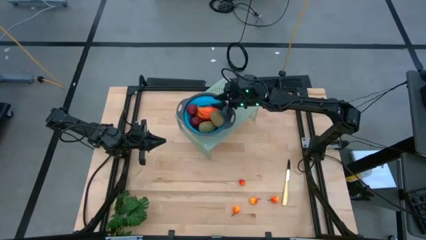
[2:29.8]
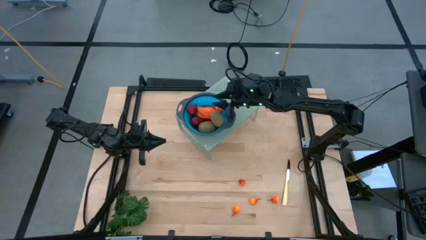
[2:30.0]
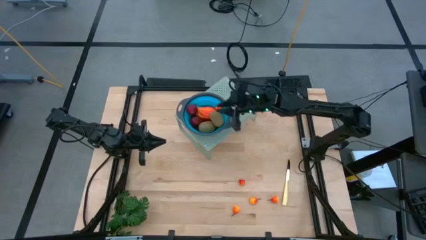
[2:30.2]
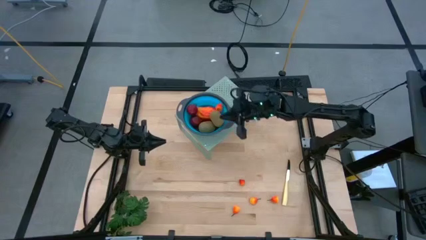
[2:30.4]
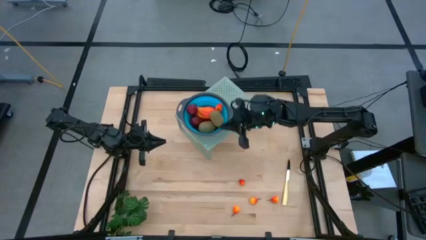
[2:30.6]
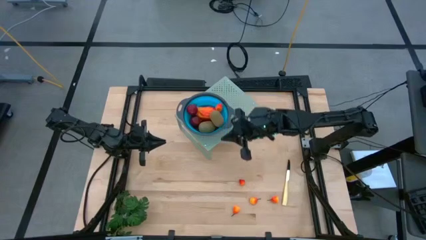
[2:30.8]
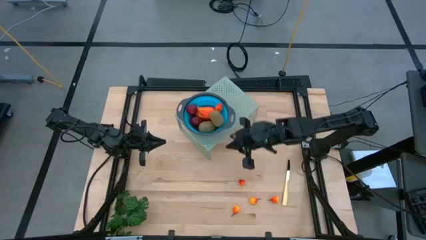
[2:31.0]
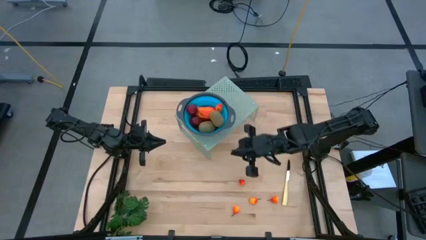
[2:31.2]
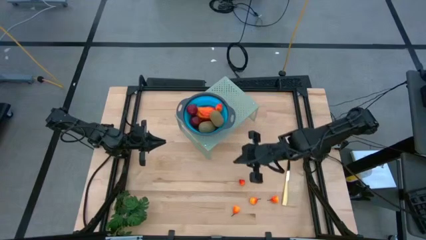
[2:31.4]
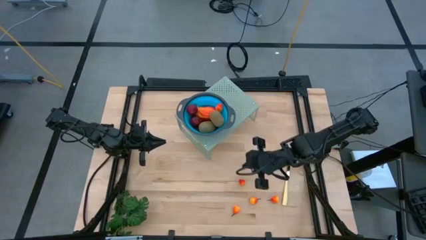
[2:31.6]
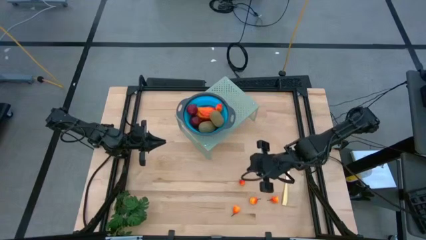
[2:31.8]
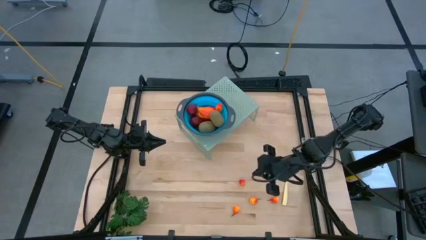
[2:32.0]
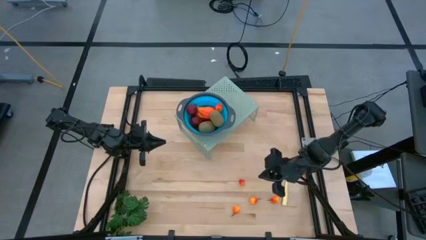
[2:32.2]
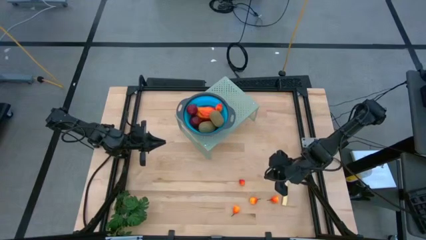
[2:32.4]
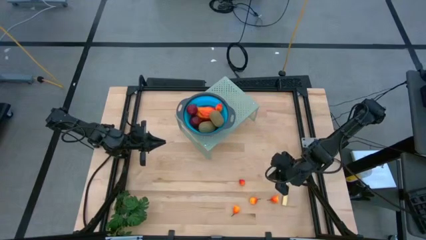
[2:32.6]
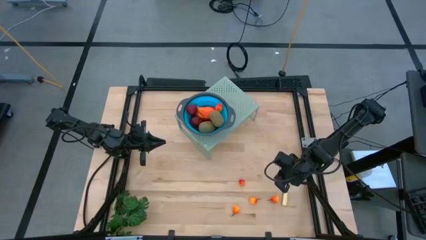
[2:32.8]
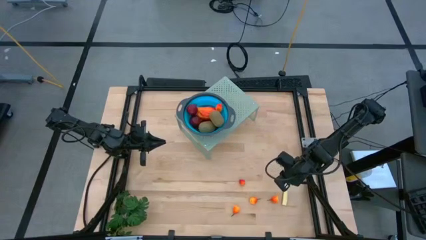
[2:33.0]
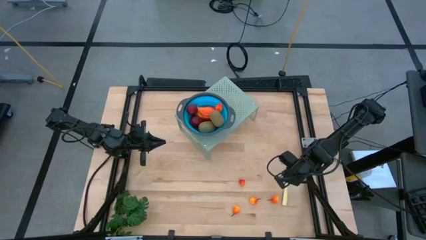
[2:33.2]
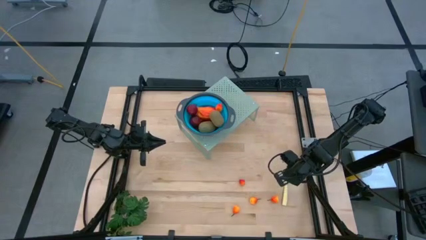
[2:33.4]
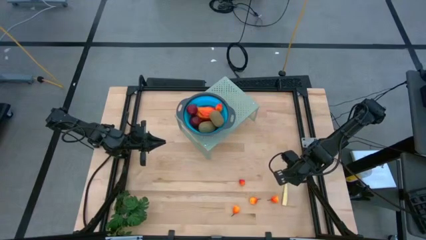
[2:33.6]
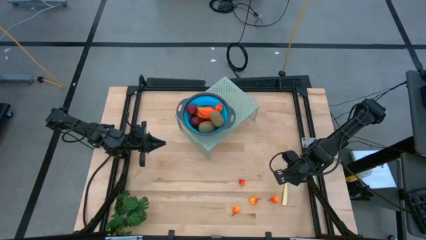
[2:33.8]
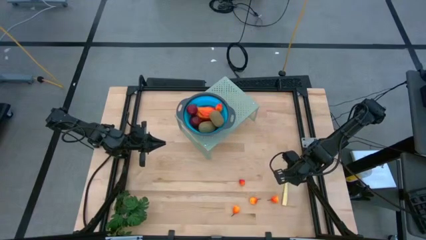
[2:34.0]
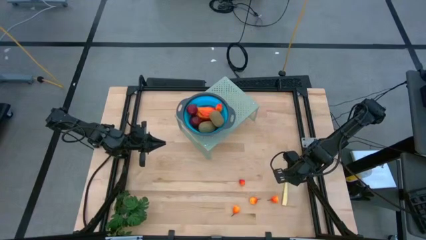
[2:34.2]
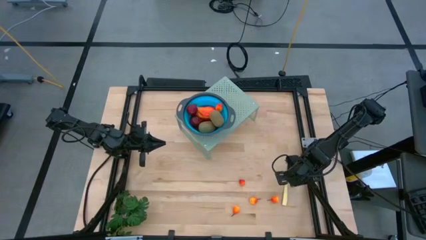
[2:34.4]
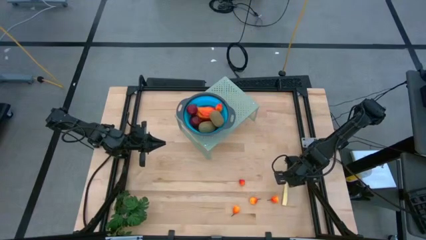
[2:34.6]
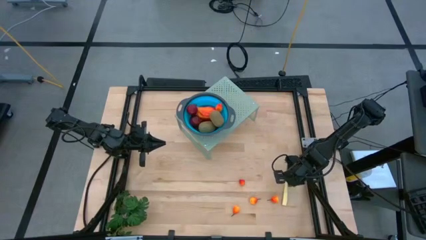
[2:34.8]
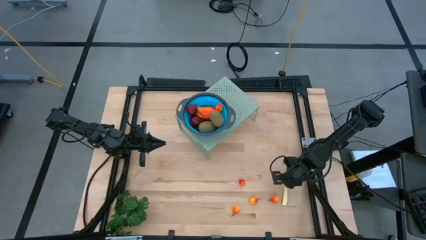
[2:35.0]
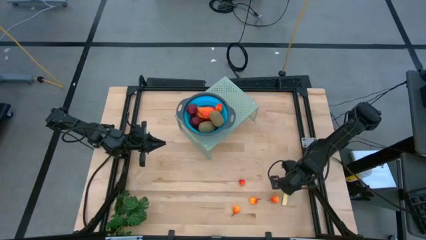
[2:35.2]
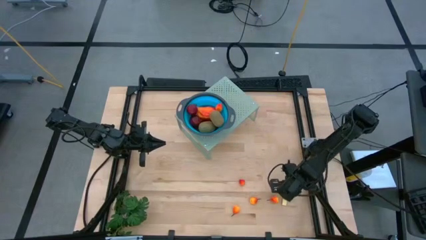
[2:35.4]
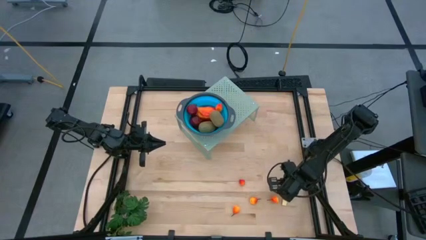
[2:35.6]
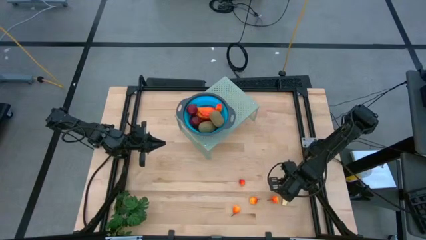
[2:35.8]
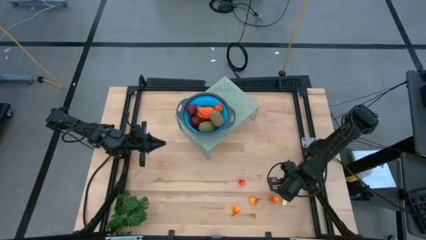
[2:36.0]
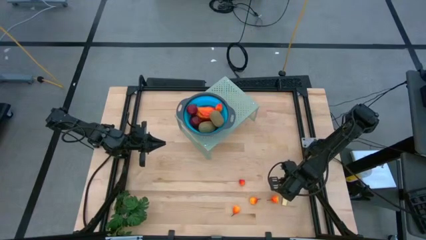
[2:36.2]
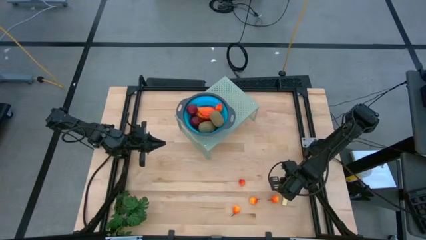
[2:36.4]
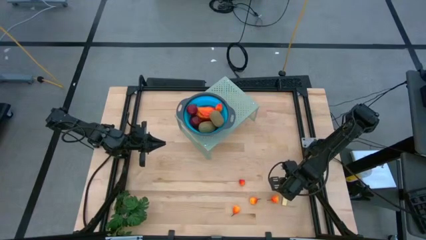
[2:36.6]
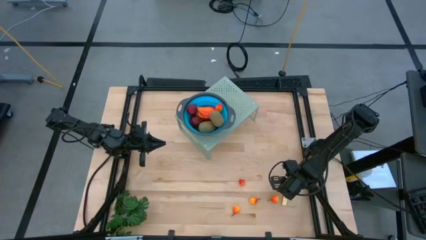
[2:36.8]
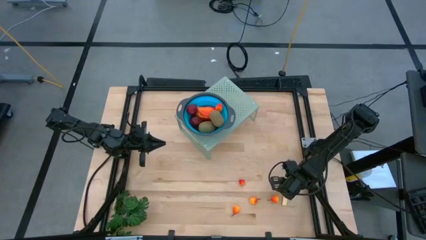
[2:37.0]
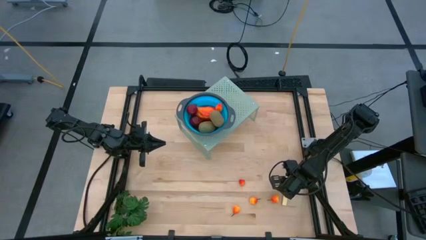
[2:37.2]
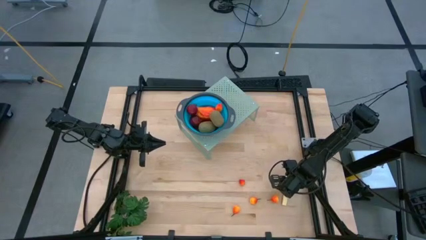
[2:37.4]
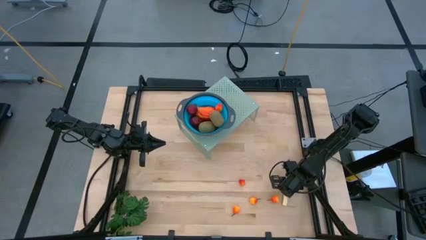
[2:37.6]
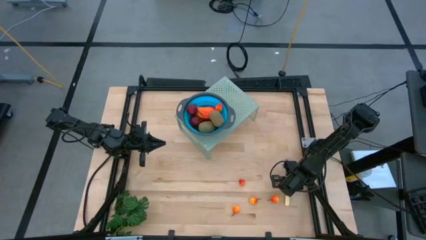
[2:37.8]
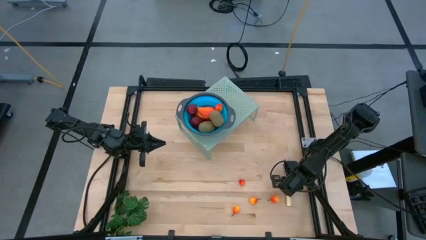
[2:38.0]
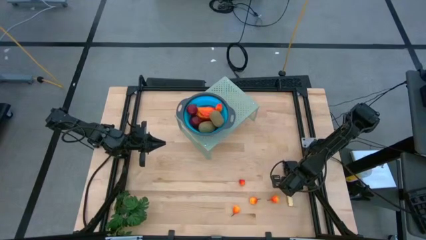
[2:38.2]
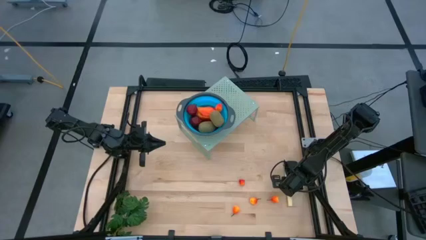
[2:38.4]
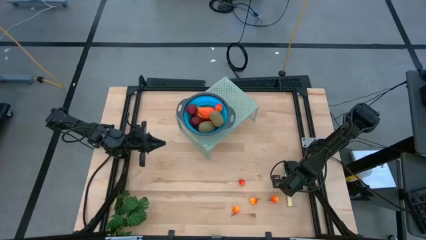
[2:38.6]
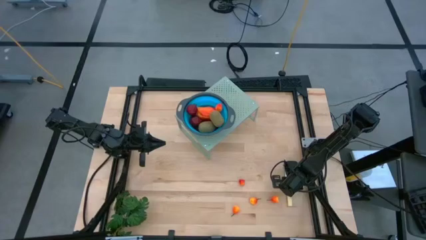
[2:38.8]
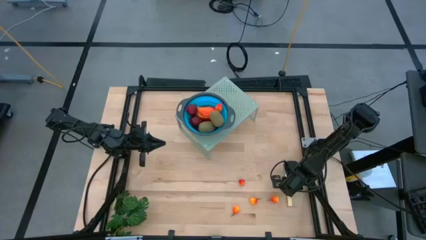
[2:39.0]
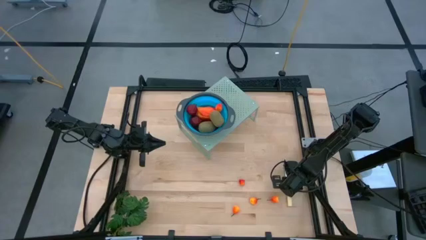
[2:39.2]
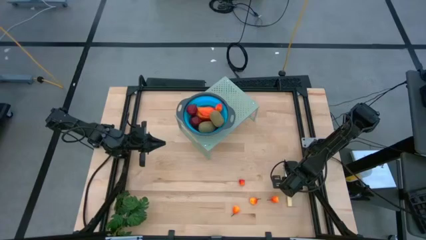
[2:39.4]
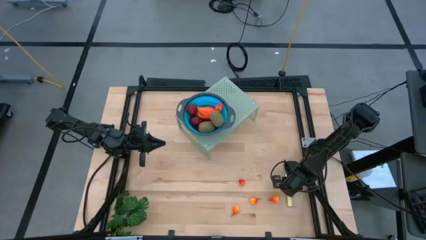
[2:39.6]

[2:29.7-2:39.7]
Task: Pick & Place Fruit
Put the knife on the shelf
